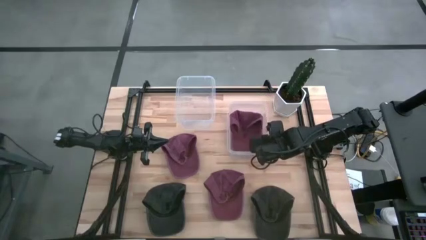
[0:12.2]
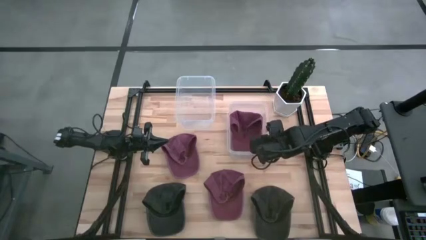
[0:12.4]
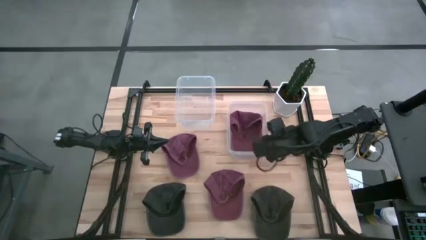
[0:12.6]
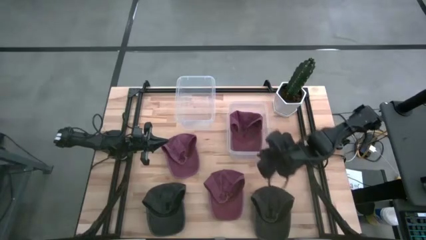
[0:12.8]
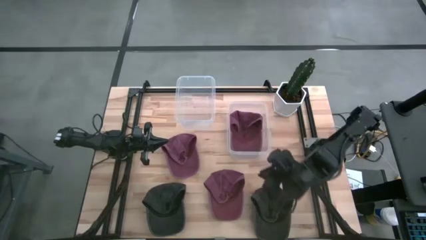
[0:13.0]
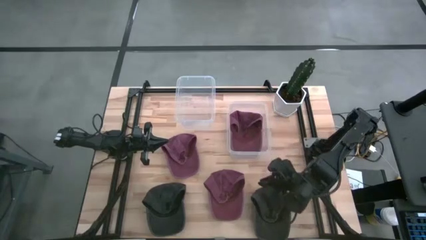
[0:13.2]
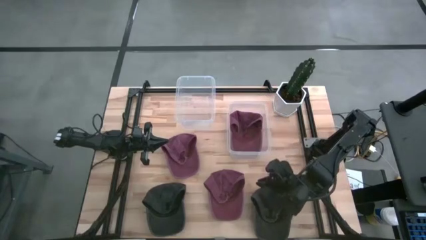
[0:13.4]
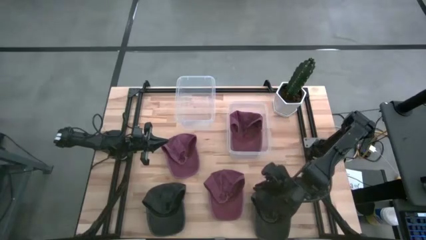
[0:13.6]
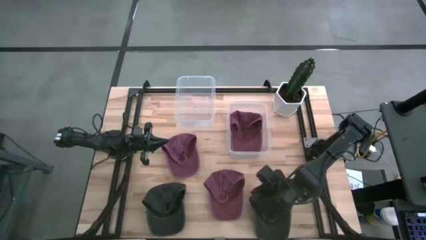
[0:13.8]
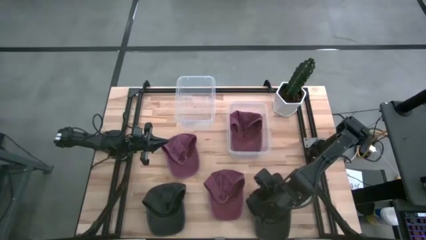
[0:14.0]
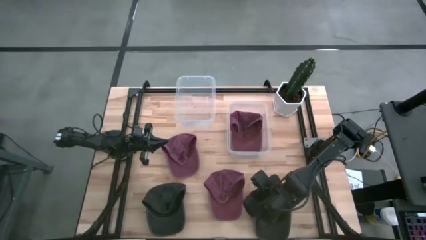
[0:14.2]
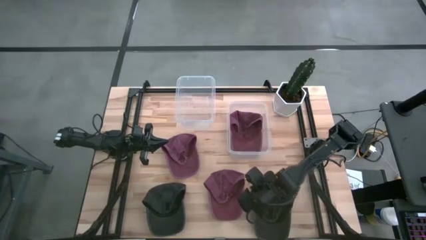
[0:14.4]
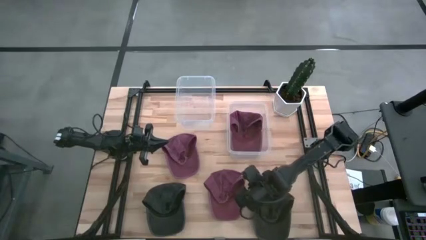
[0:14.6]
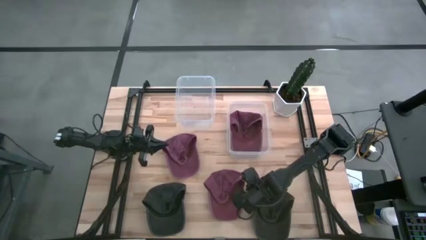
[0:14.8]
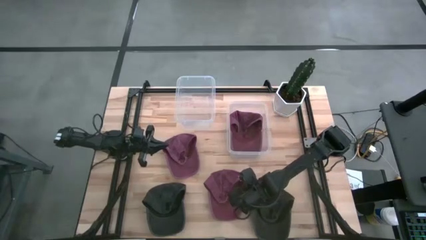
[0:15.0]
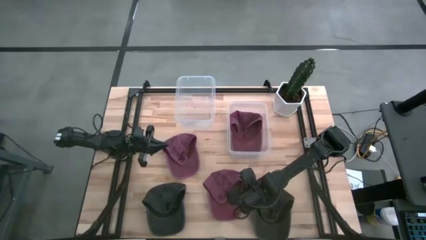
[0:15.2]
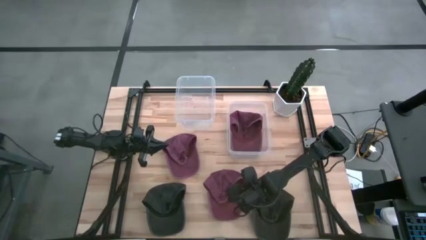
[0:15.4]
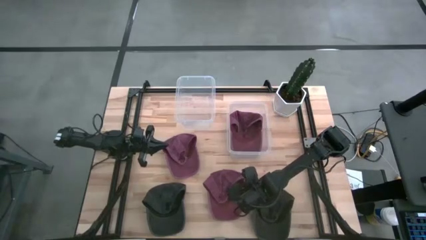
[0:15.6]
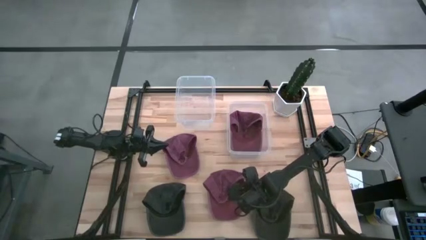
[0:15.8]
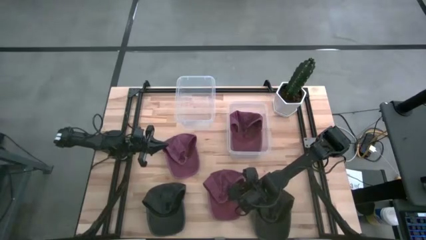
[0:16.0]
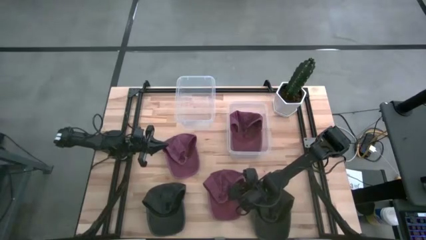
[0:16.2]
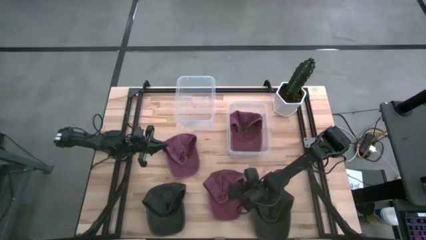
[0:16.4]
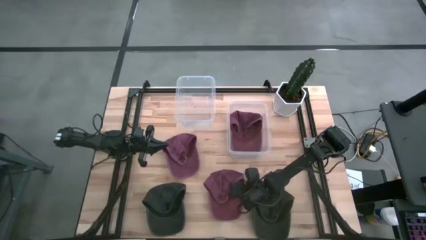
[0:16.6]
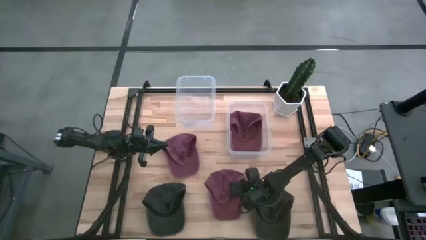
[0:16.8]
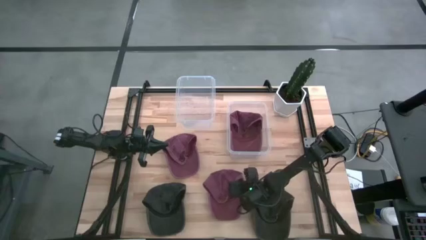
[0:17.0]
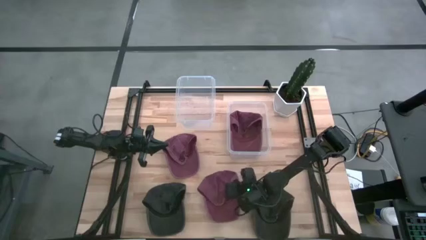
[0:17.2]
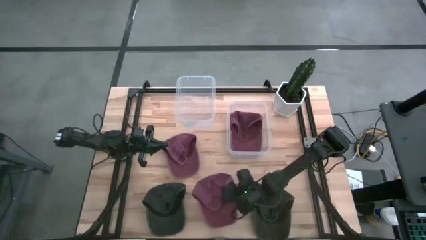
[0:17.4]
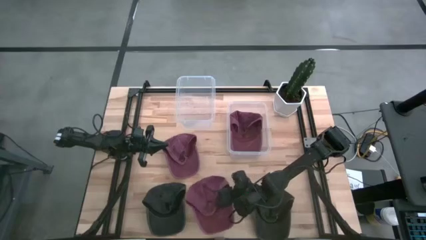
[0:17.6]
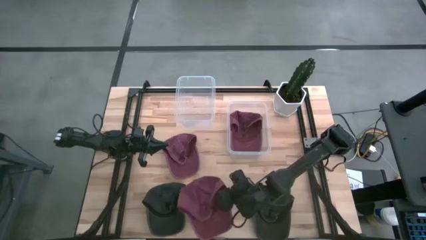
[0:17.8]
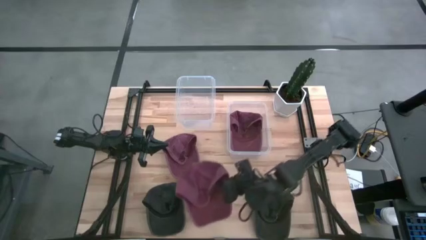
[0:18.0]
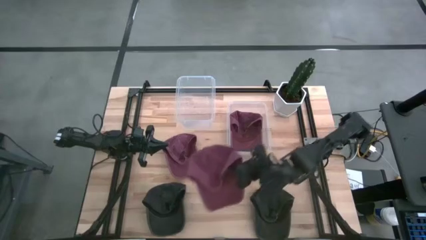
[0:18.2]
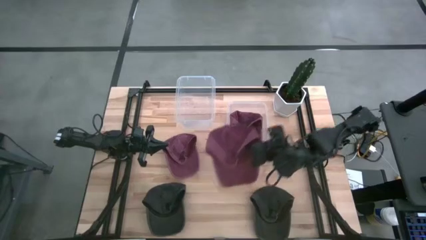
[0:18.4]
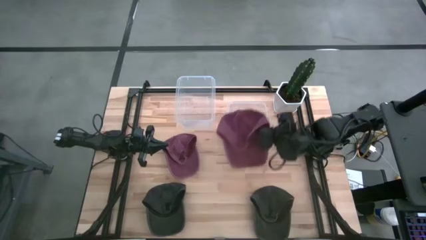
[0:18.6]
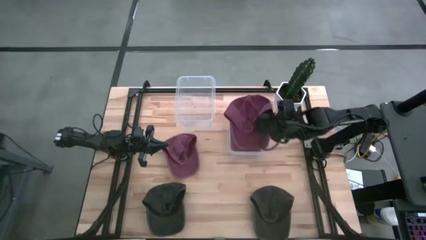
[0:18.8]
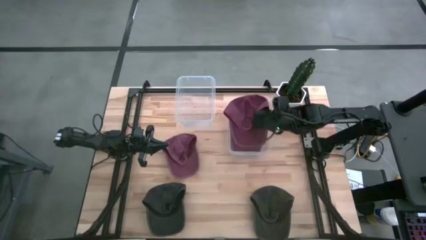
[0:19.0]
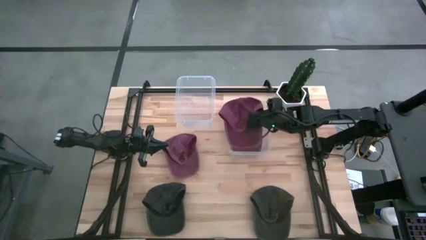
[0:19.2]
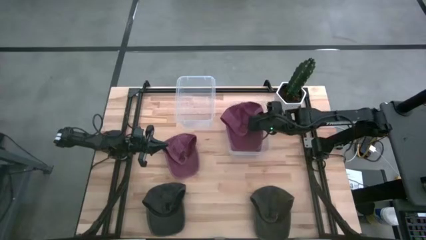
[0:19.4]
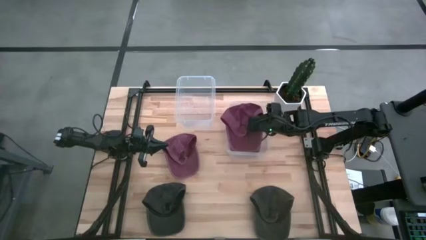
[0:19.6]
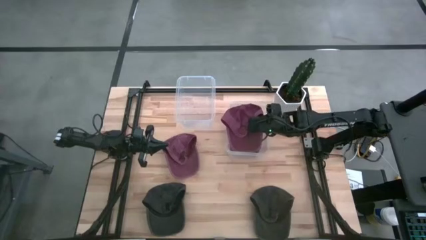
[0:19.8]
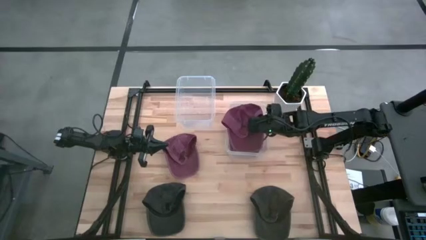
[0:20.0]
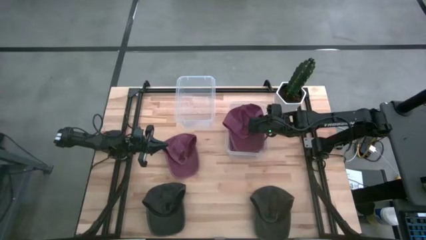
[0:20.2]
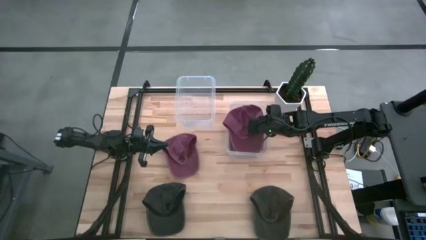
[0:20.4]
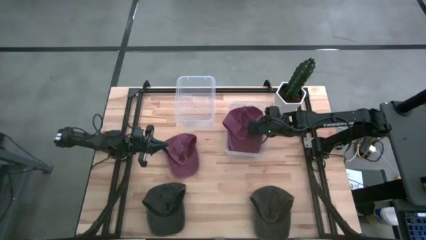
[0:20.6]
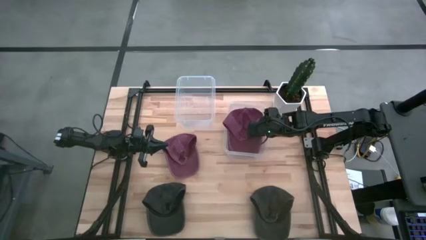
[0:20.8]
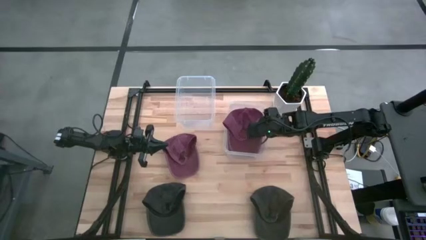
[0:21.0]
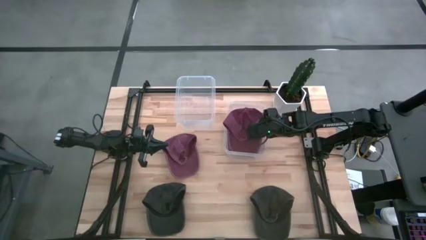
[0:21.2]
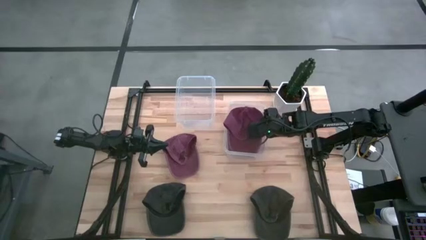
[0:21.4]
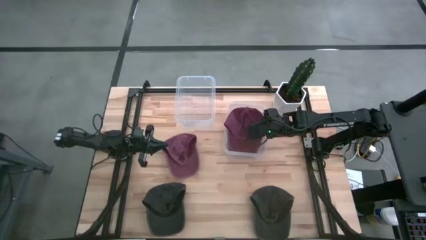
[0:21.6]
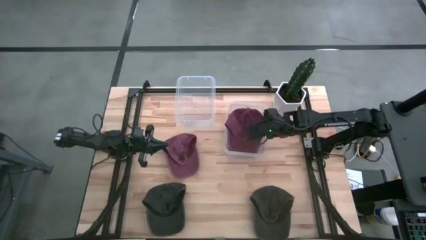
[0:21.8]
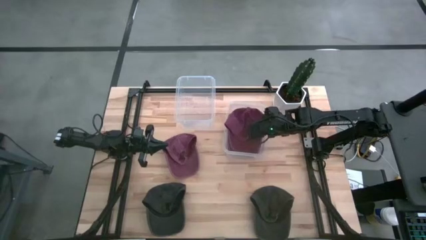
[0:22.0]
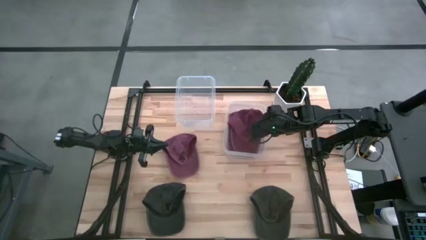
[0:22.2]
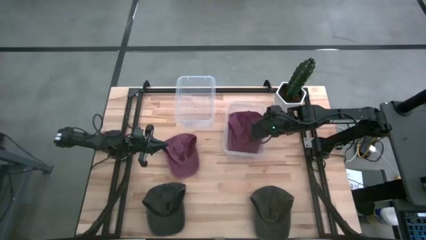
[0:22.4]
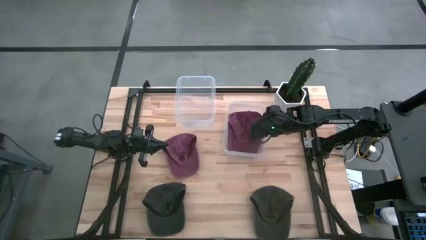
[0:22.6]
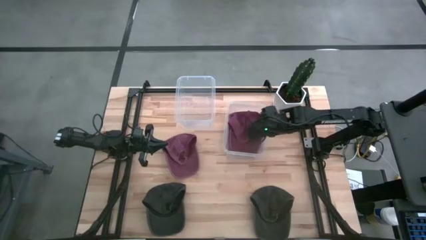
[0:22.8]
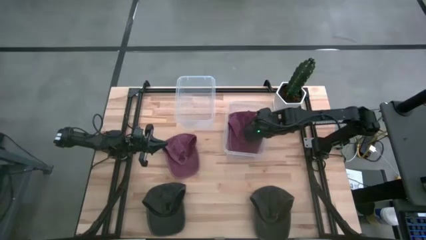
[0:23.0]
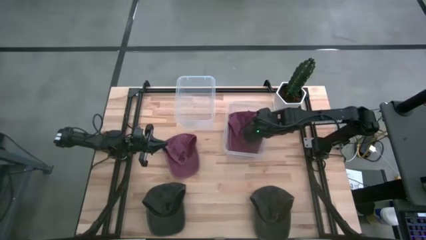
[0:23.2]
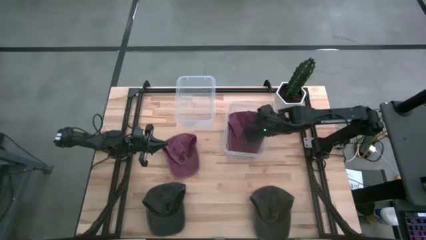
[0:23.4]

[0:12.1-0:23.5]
Task: Pick & Place hat
Put the bottom red cap into the right transparent bin
